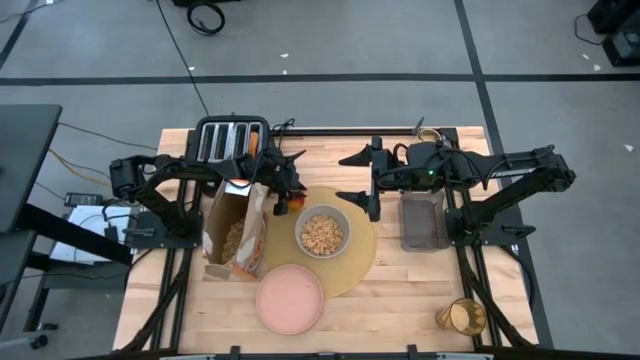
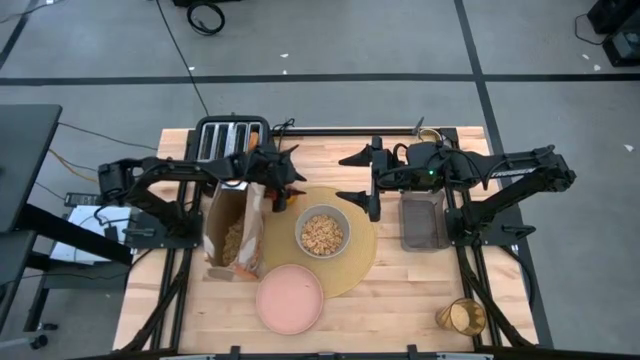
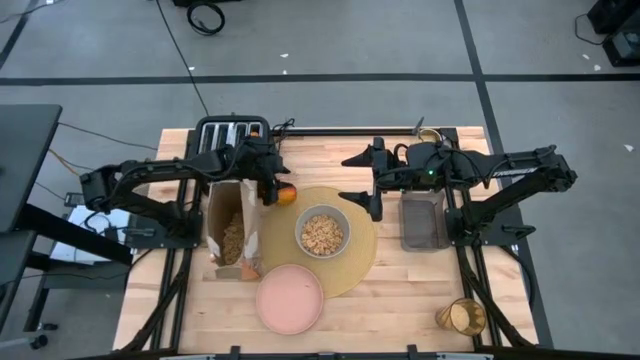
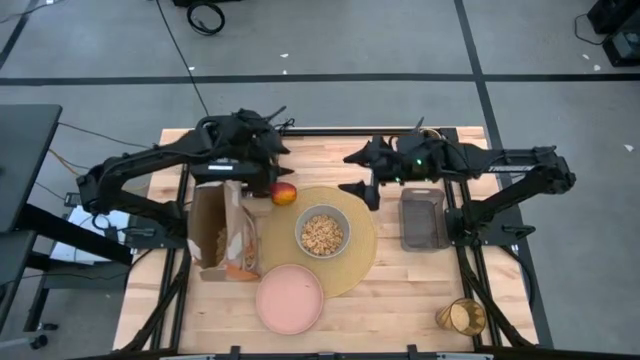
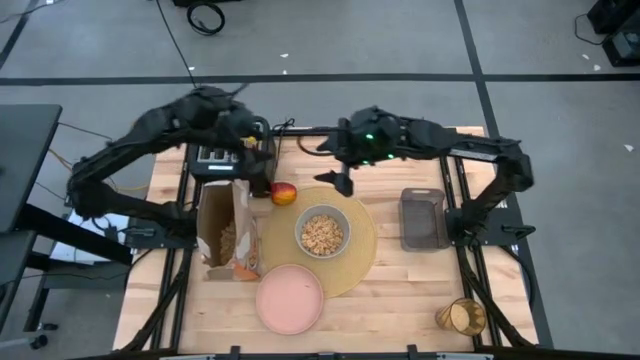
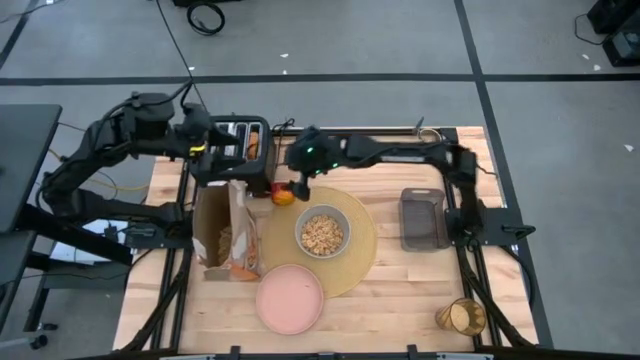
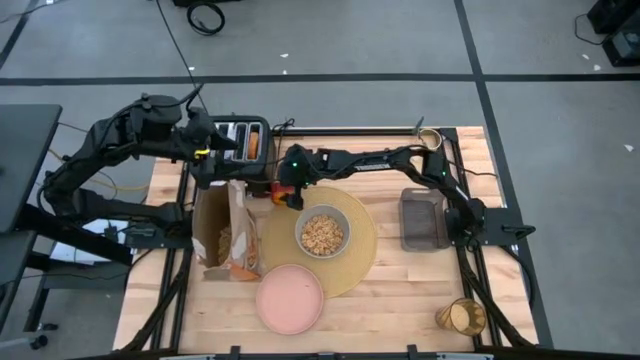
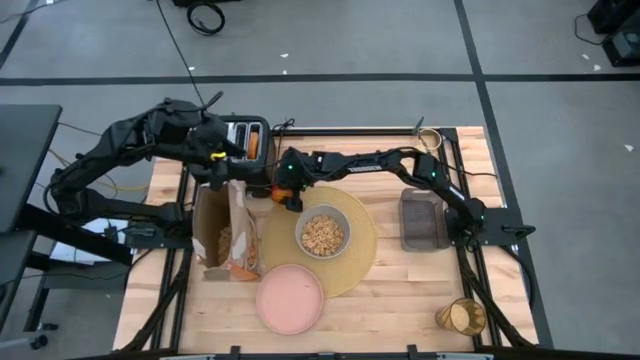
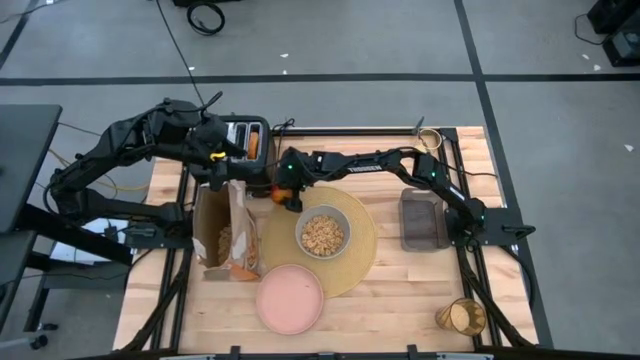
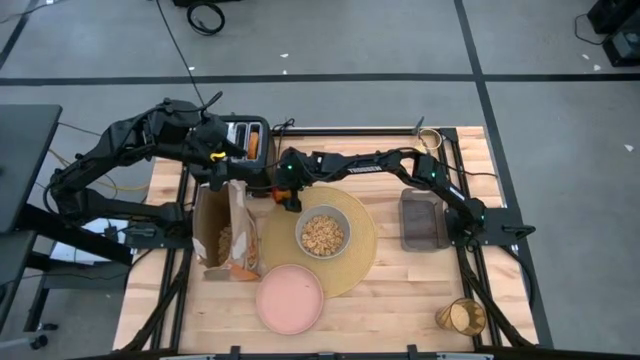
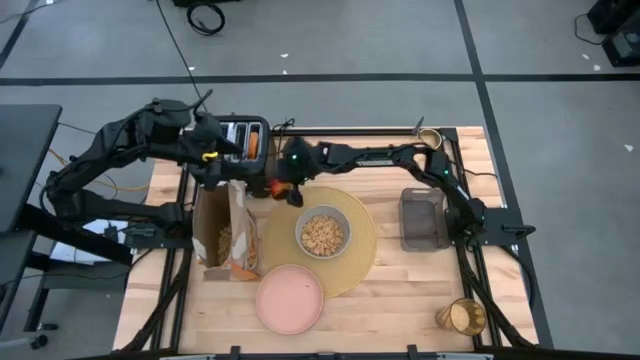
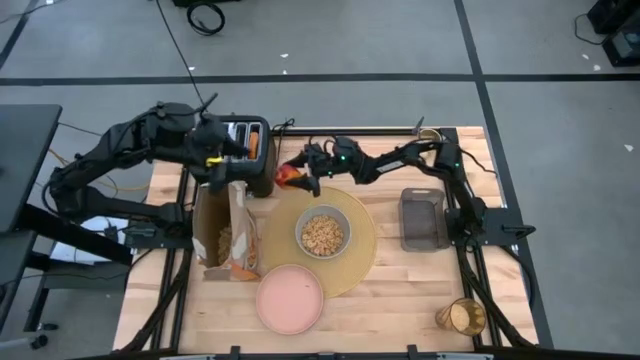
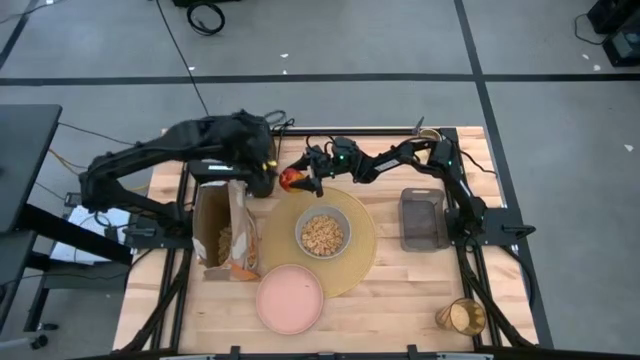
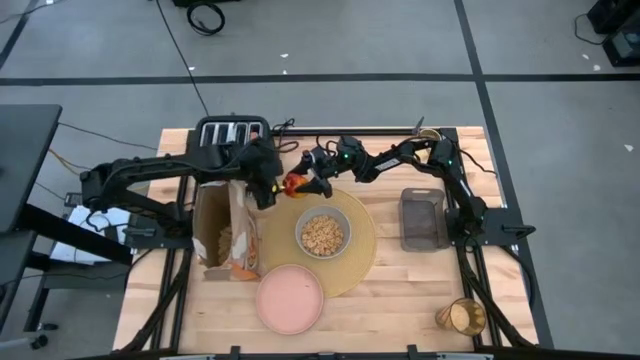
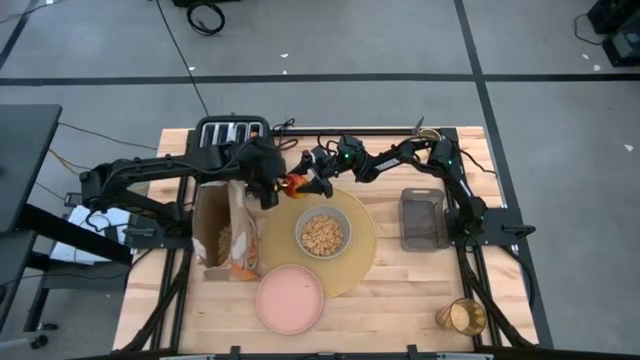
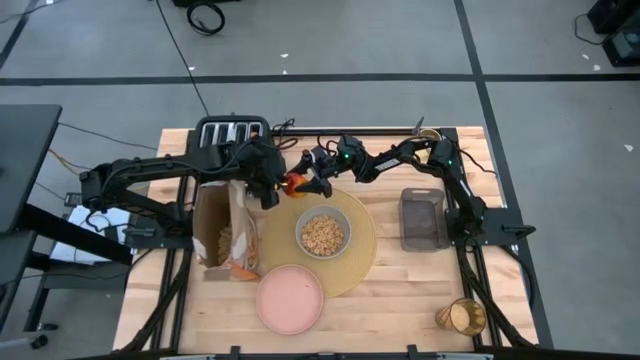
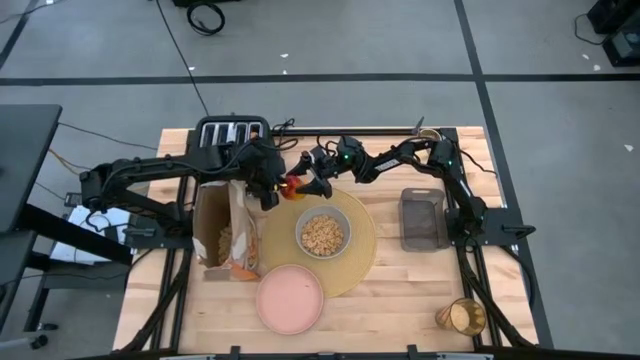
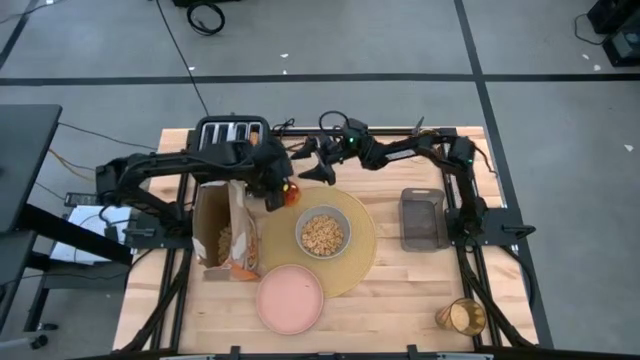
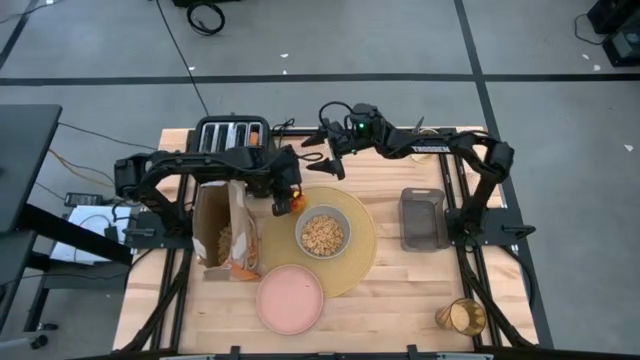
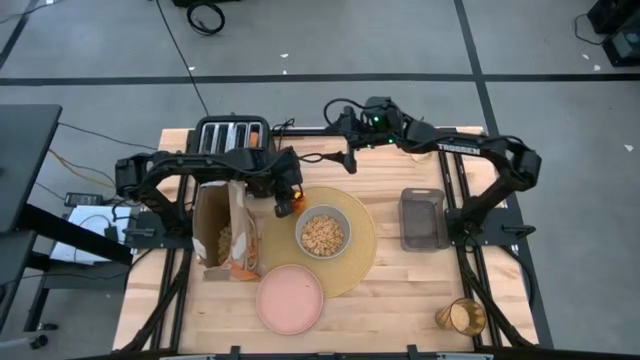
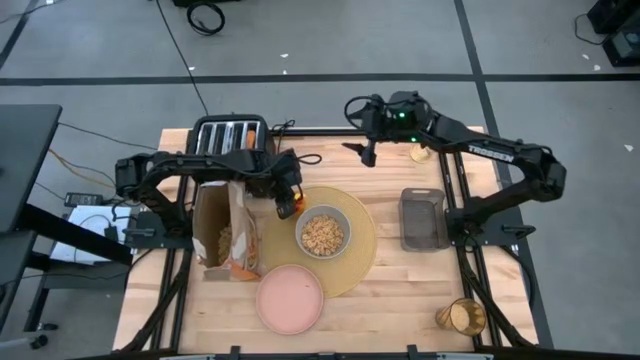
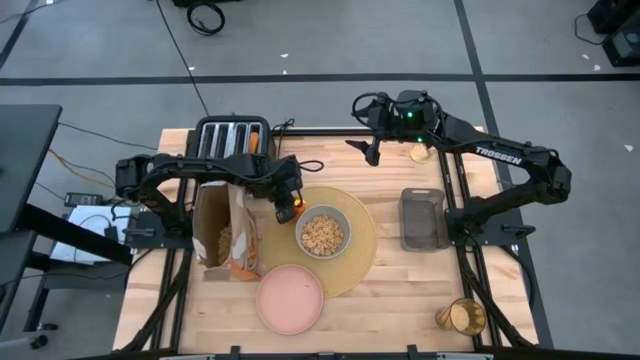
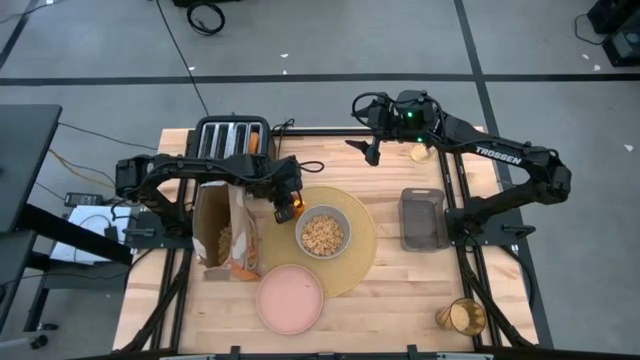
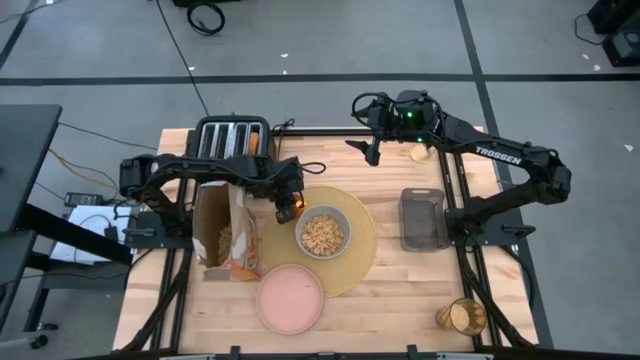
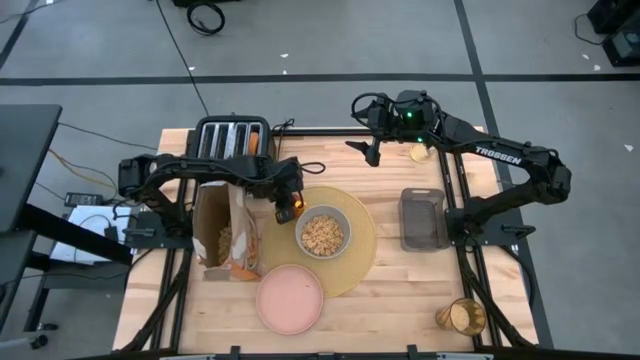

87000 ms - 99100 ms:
Task: Arrange a breakfast setting
Put the apple on the top left of the gray bowl on the yellow placemat

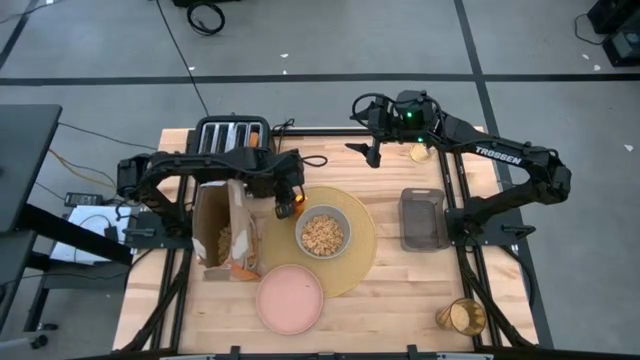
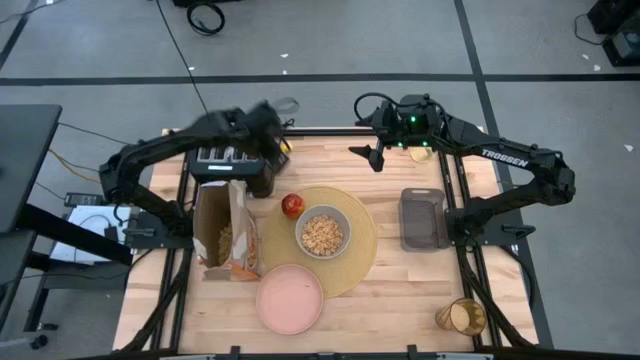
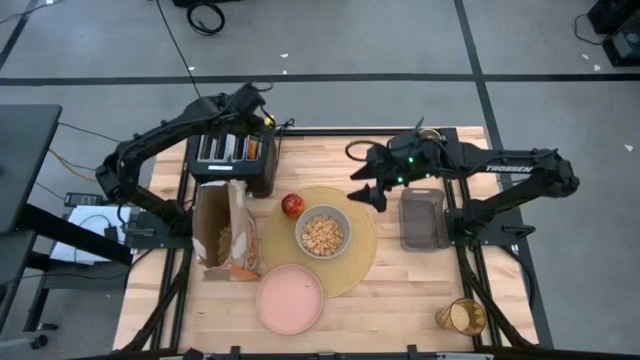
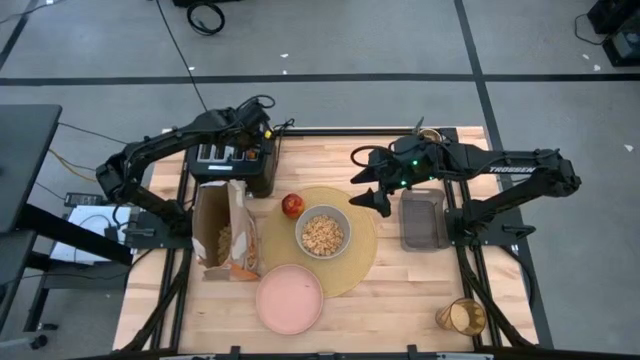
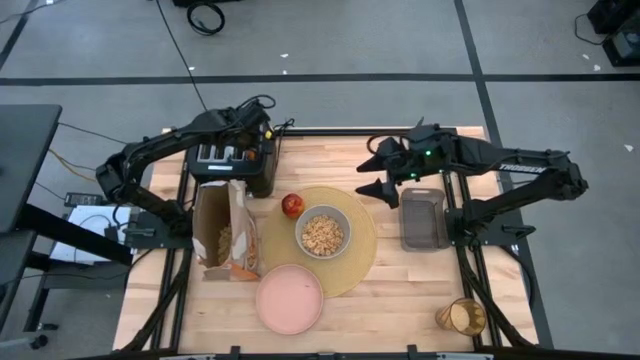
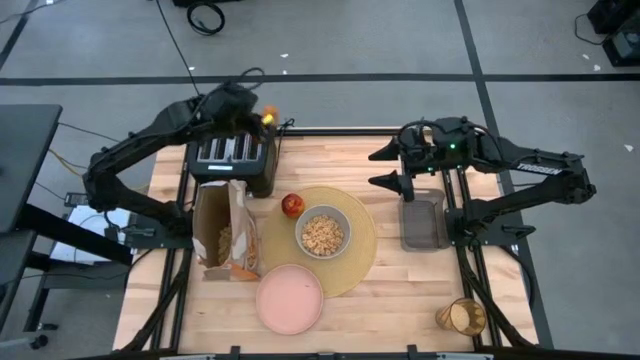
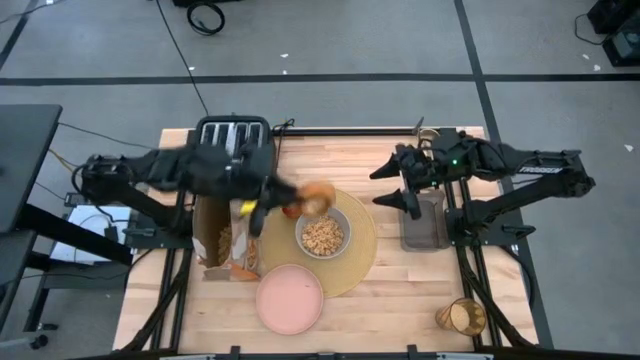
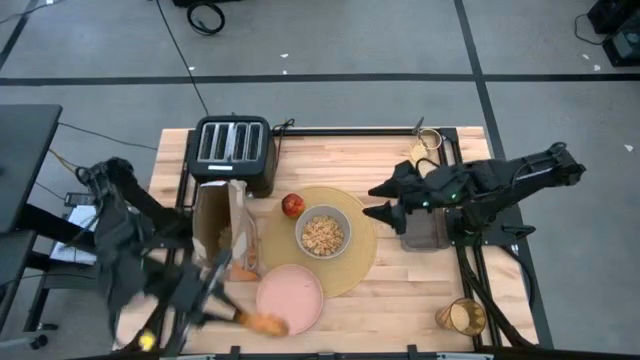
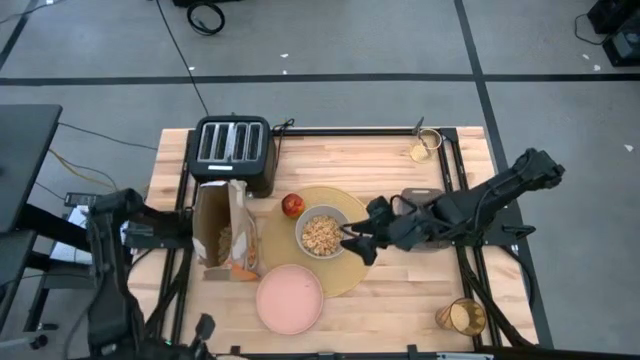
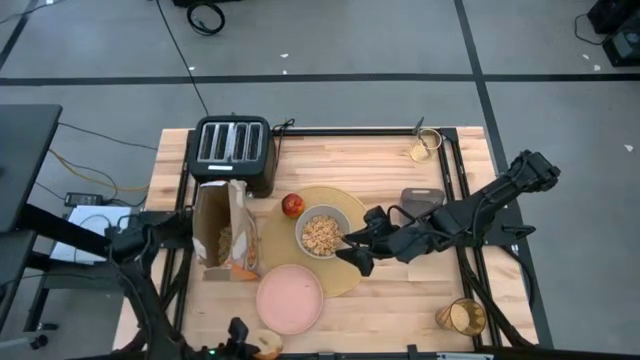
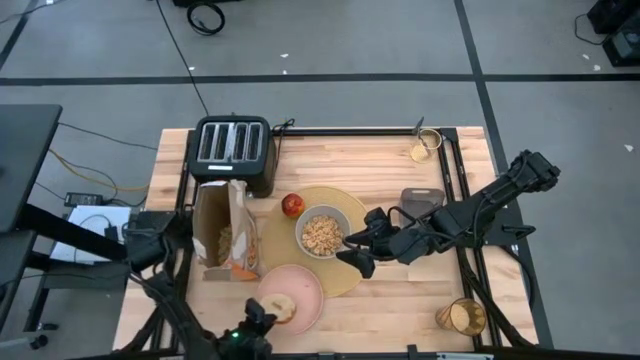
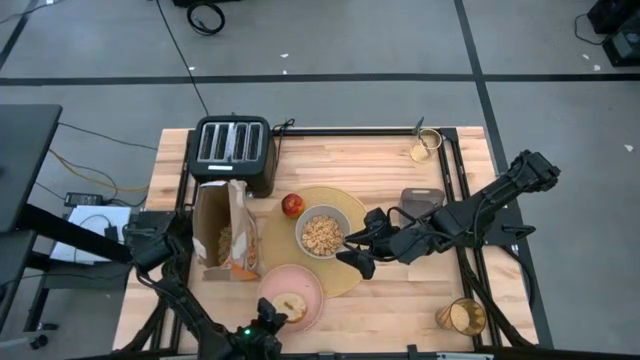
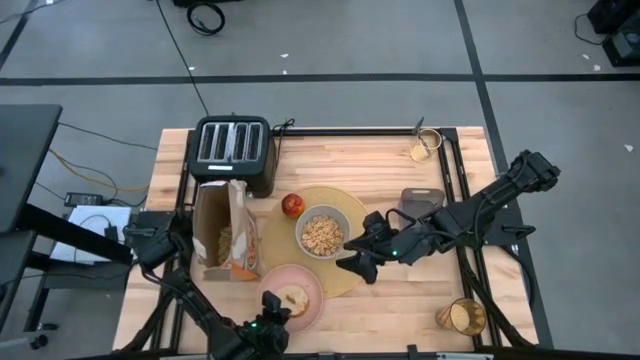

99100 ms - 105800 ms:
Put the toasted bagel on the light orange plate

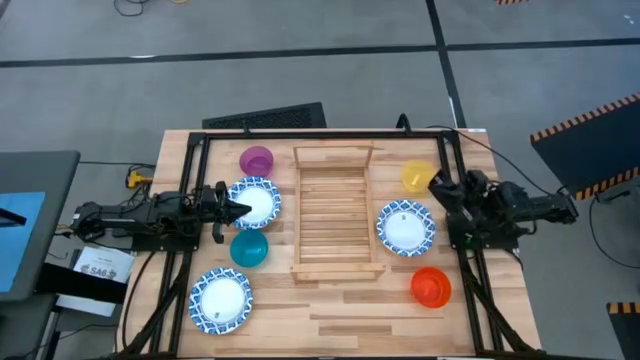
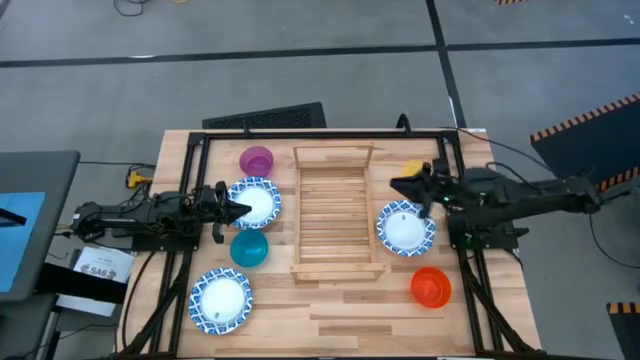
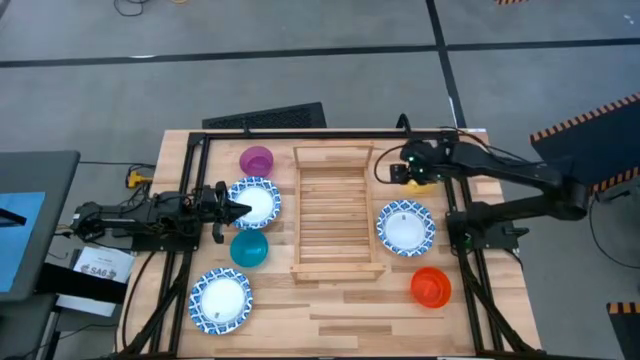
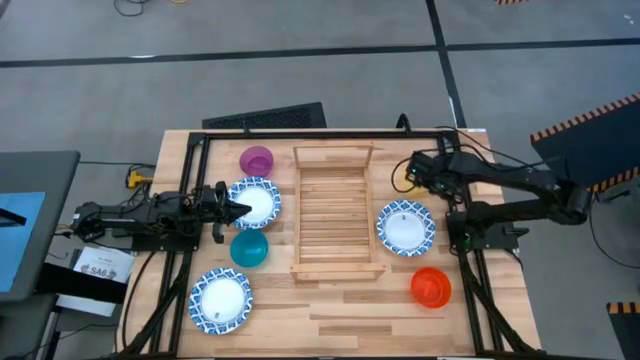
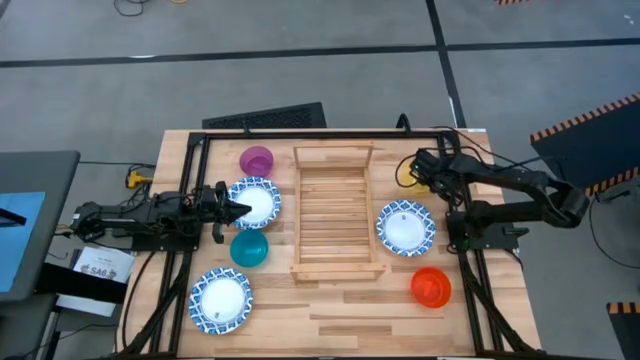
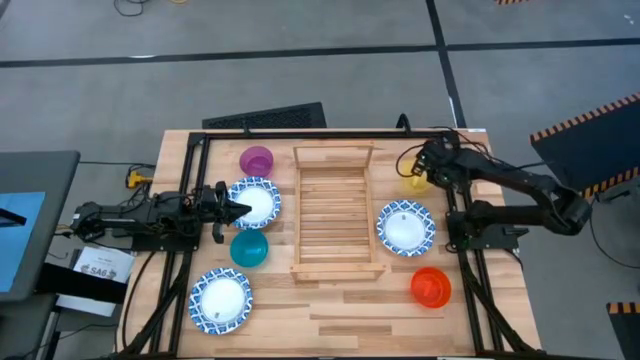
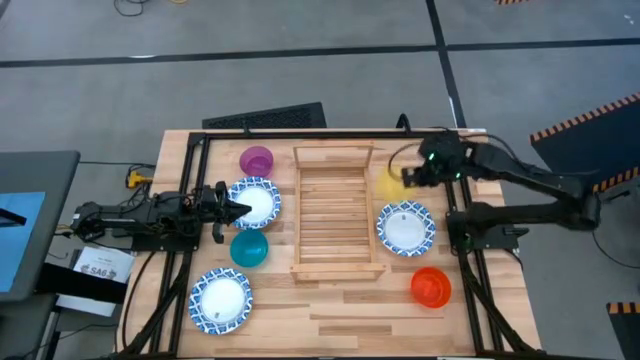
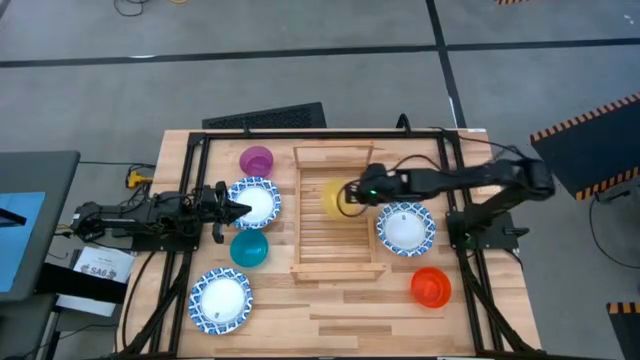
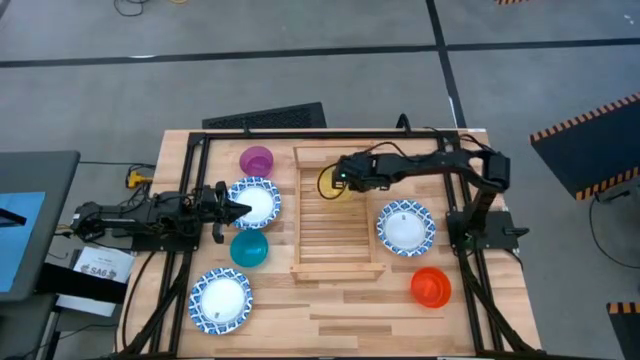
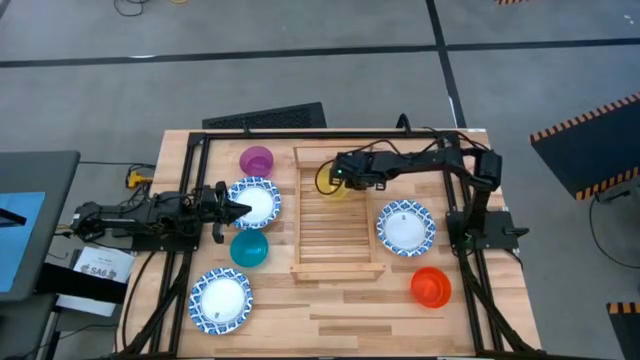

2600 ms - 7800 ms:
Task: Place and stack bowls onto a shelf
Put the yellow bowl on the shelf
